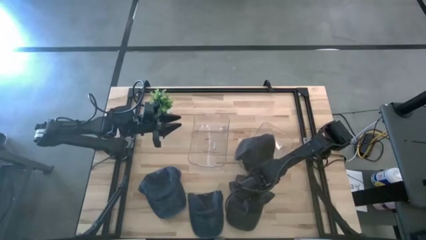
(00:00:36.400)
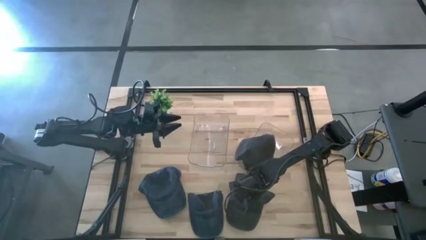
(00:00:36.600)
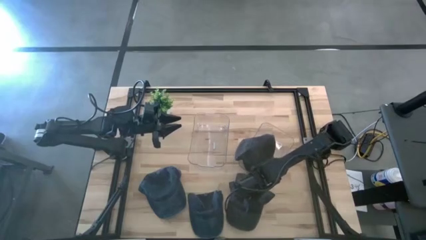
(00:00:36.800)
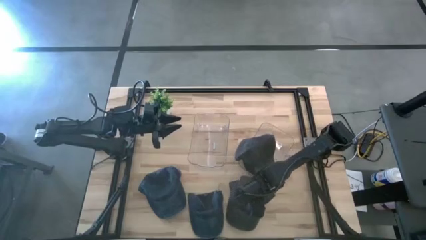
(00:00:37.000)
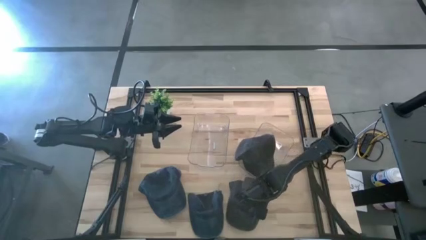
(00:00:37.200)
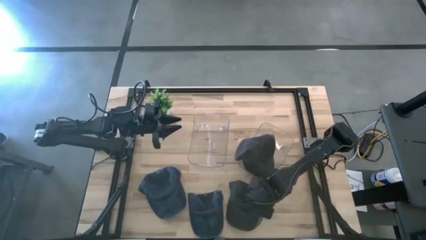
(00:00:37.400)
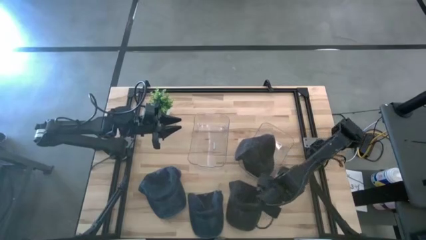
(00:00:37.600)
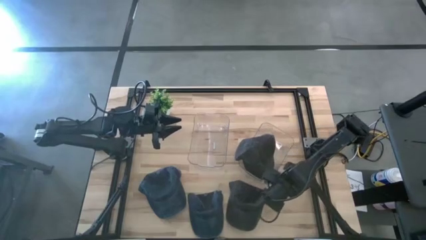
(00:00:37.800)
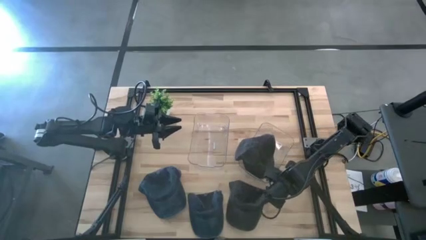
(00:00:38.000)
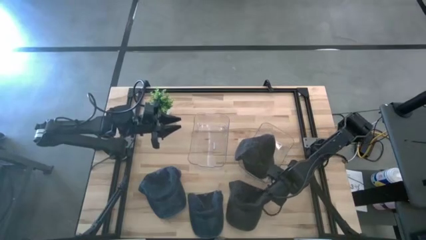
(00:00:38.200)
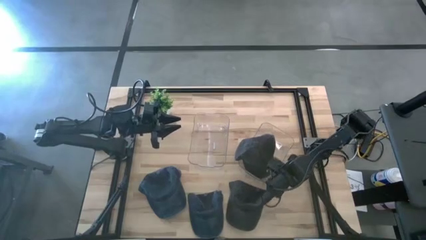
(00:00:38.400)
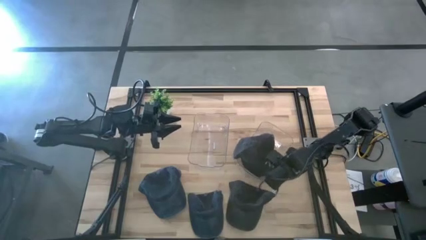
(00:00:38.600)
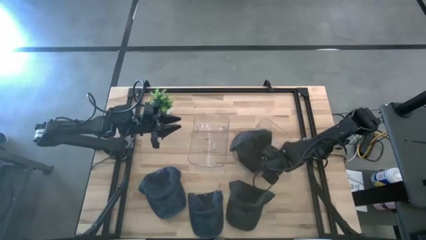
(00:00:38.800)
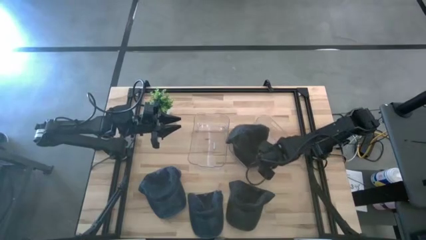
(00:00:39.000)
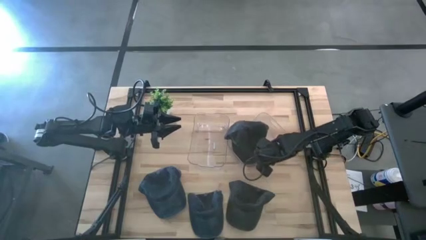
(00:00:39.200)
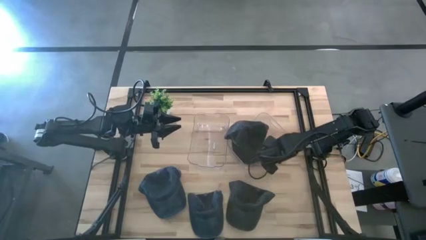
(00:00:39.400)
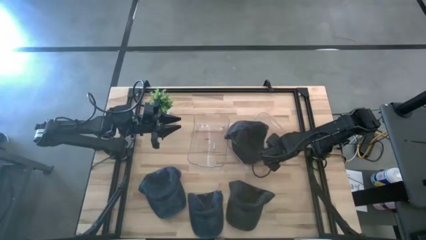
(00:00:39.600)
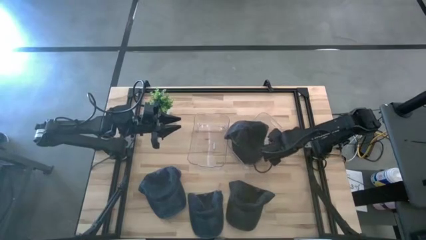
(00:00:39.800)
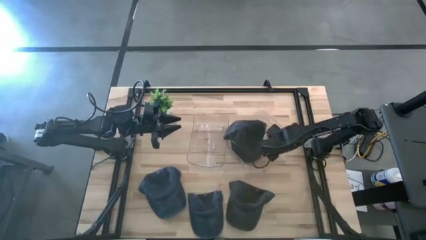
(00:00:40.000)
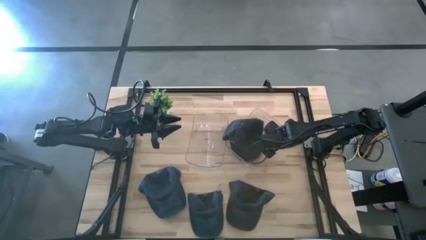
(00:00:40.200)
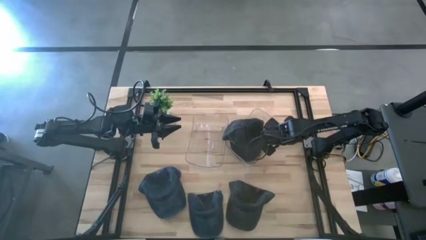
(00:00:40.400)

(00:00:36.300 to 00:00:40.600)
Task: Pick & Place hat
Adjust the right transparent bin

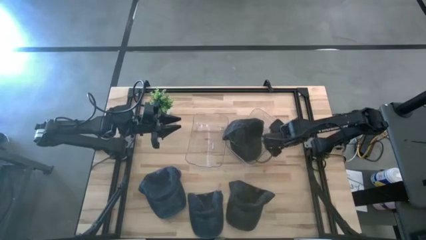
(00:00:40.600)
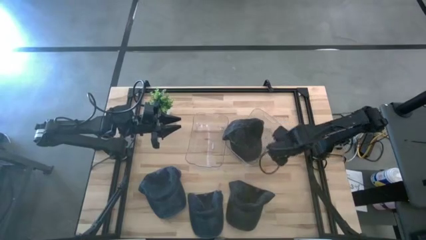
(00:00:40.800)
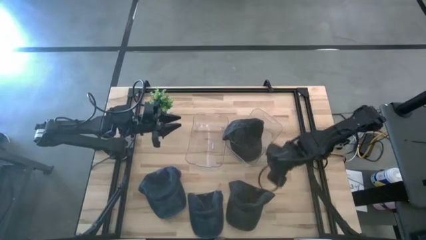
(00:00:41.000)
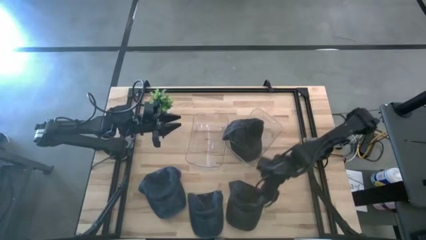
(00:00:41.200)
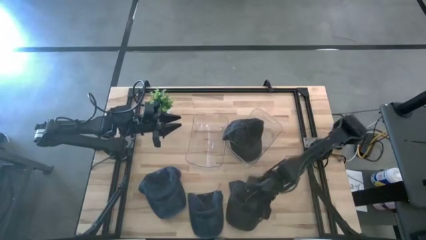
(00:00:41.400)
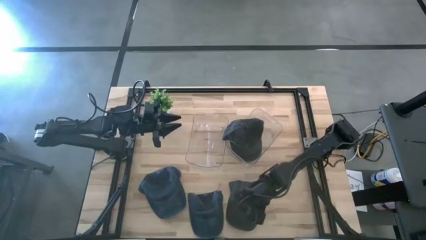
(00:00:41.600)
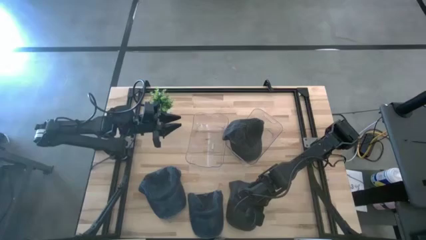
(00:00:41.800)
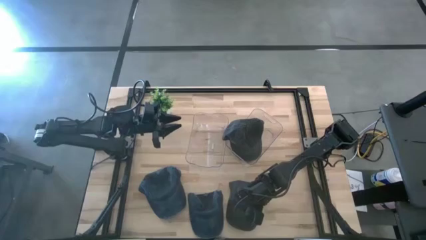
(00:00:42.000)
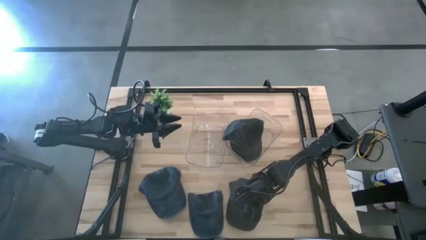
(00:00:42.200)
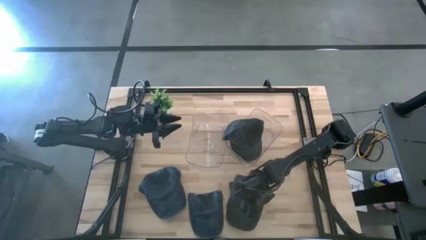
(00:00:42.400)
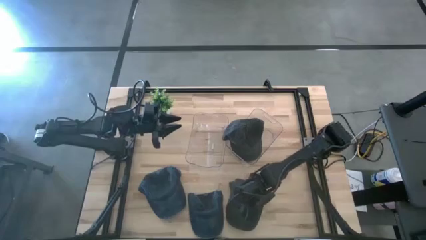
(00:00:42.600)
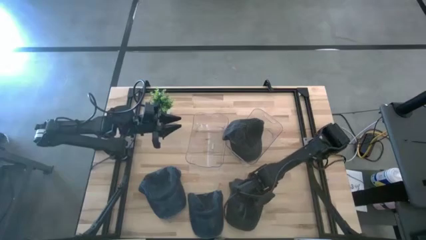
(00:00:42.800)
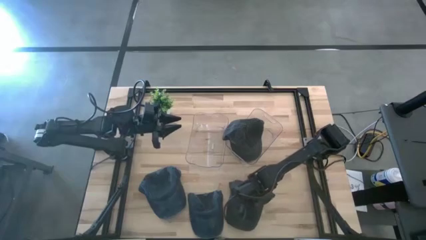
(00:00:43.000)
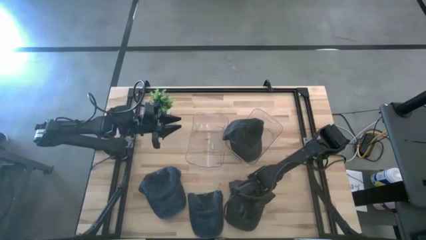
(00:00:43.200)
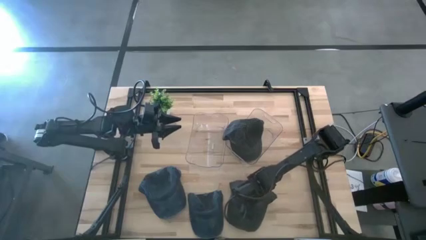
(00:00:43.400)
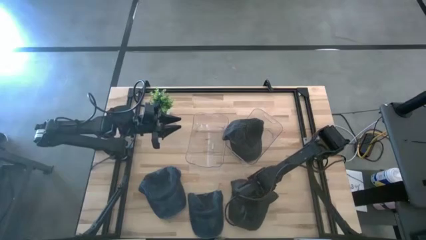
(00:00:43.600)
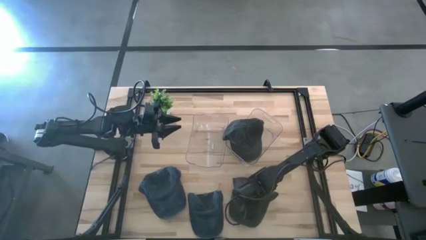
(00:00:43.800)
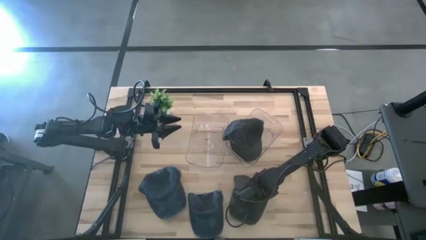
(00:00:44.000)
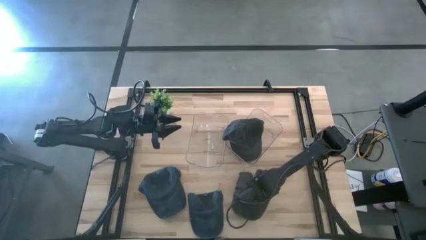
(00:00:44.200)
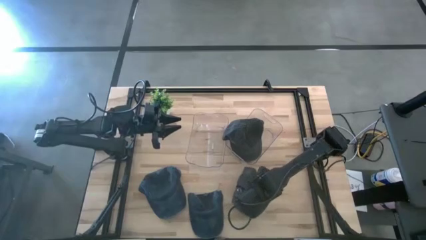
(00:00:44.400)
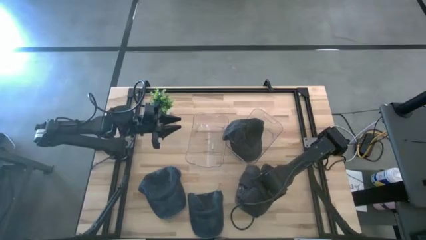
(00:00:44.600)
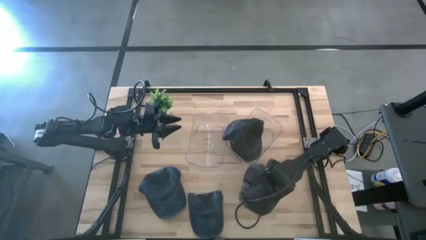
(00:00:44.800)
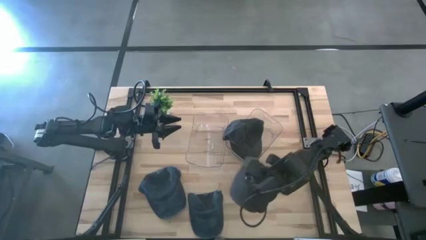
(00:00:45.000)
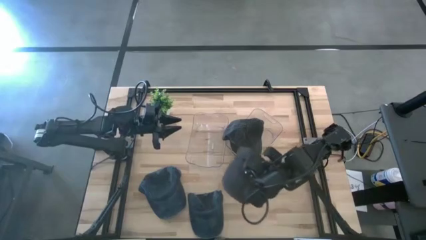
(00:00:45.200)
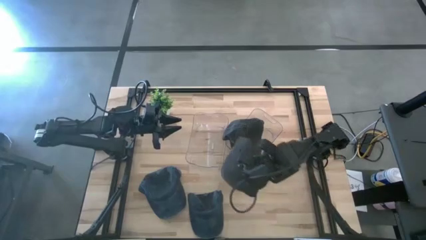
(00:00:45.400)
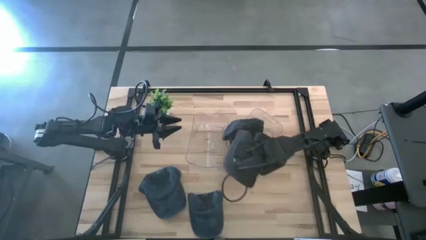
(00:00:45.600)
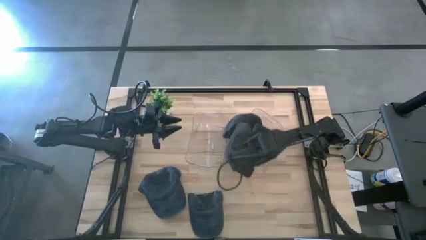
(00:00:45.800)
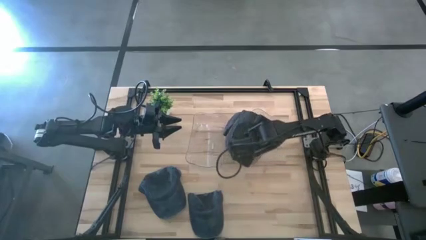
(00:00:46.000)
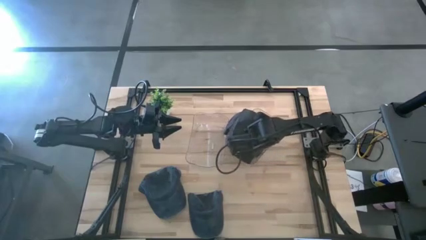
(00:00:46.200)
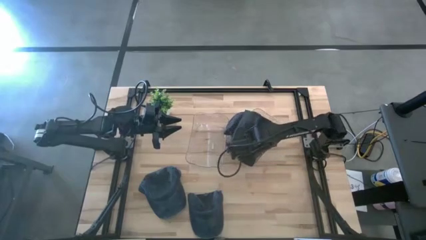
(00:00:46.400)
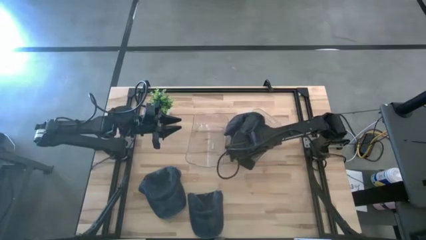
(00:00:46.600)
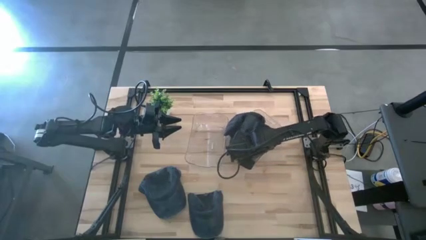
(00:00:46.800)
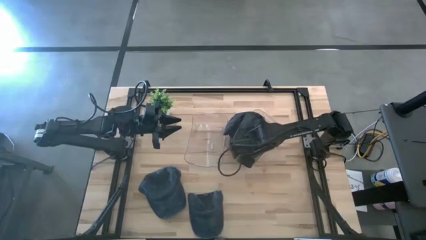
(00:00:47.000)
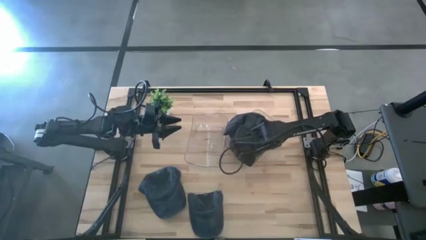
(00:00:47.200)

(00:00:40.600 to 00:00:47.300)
Put the black cap into the right transparent bin

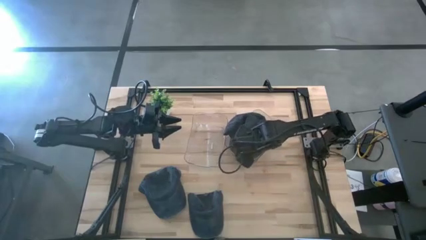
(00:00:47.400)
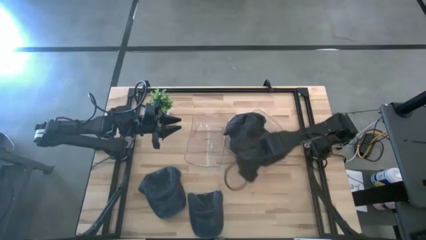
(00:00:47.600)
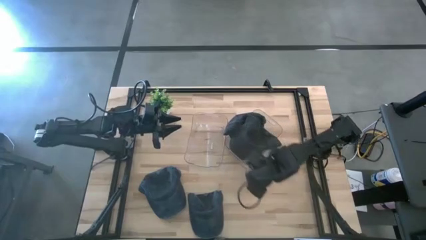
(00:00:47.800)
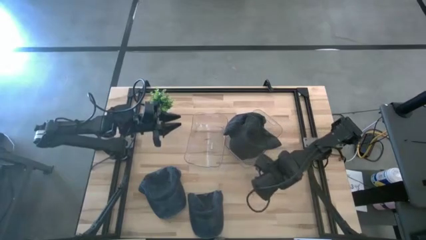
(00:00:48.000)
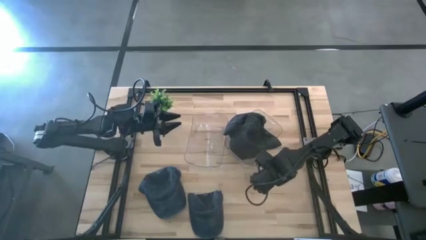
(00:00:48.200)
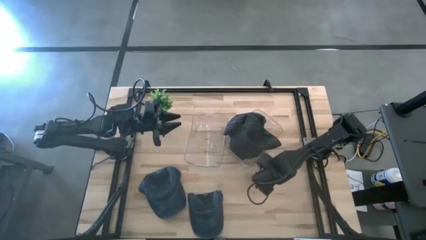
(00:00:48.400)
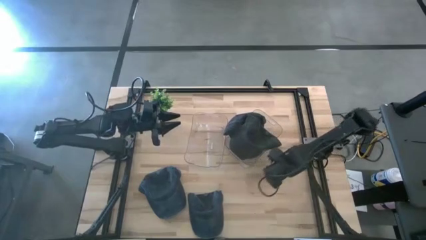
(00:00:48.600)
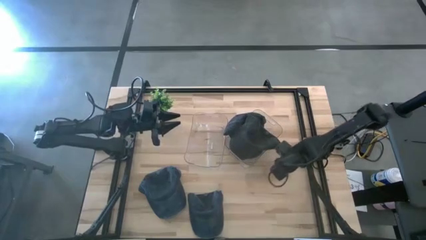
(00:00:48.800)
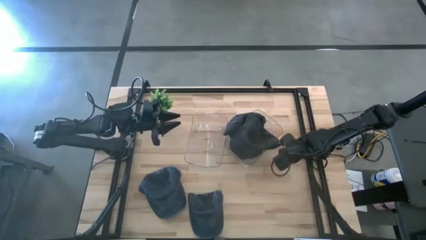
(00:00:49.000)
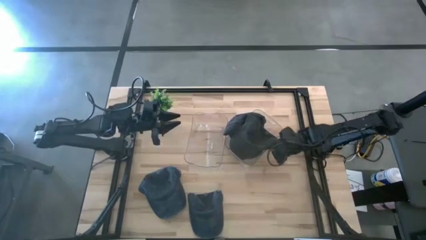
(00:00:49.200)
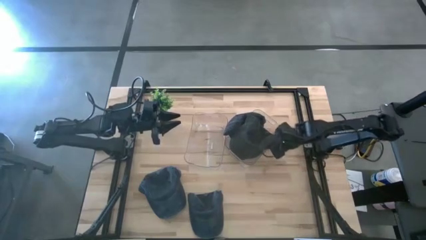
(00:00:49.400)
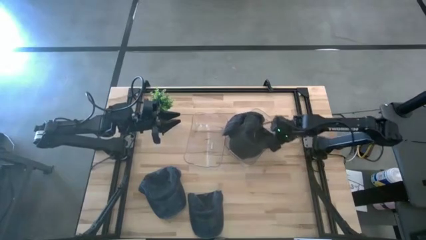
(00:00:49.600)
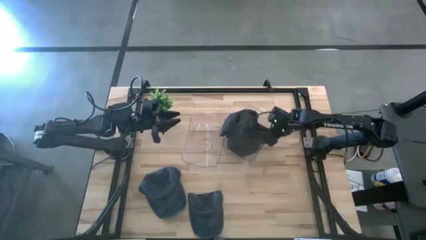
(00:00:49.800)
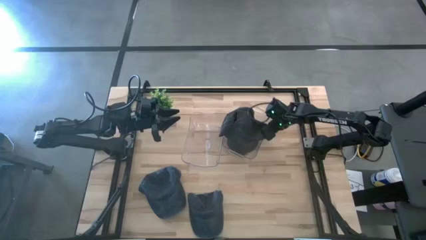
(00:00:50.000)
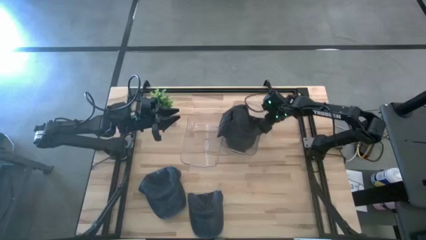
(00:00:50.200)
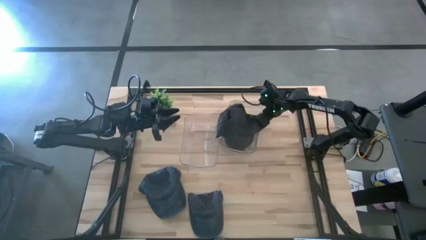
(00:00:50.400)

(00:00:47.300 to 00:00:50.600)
Adjust the right transparent bin

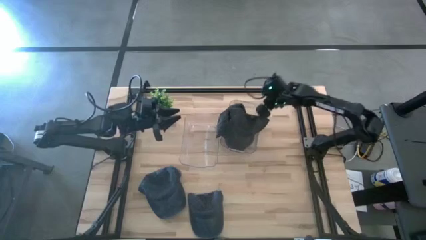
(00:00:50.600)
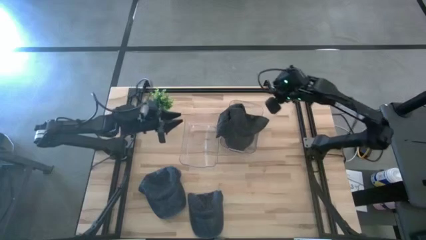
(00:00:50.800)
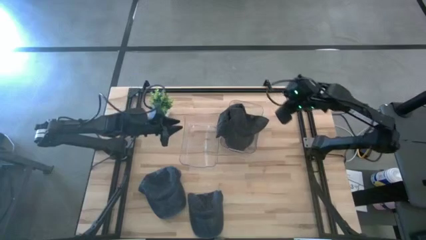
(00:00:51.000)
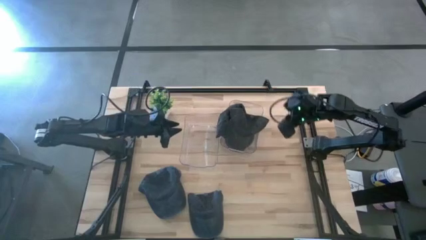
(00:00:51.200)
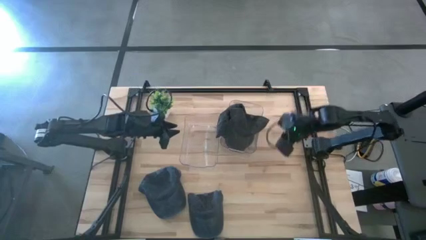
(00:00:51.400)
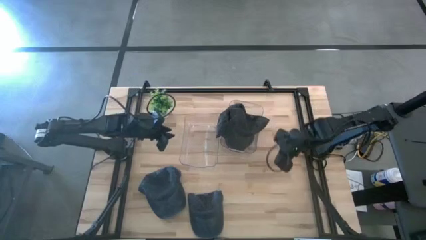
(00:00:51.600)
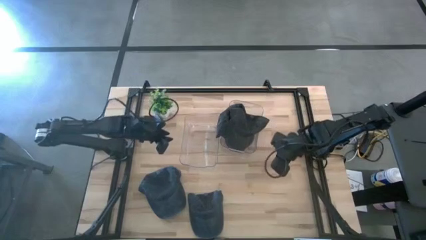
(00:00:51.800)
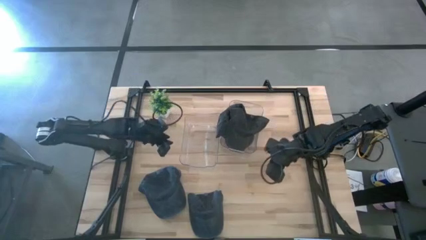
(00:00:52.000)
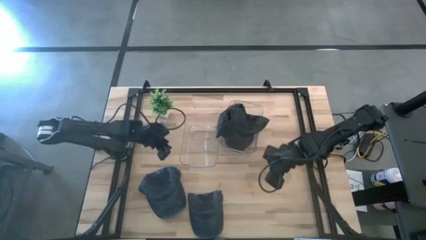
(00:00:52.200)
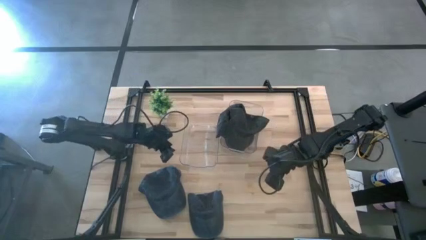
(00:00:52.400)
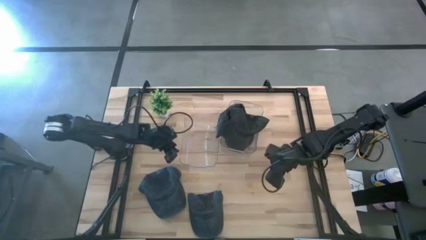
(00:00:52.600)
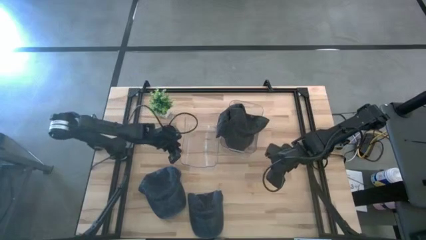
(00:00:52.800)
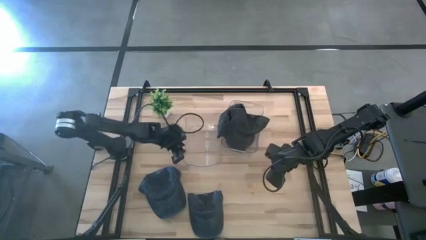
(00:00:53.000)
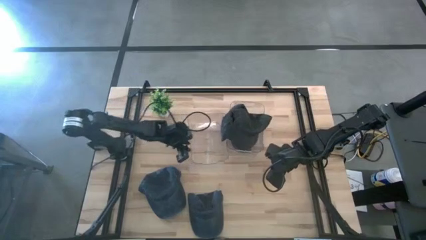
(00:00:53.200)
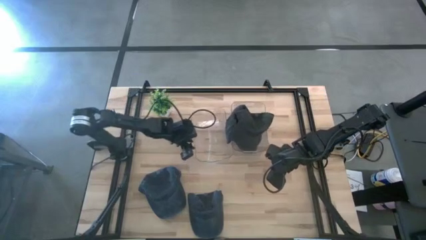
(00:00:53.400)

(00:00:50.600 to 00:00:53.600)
Adjust the left transparent bin
